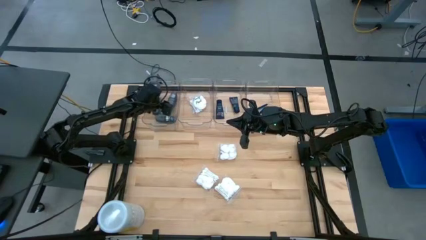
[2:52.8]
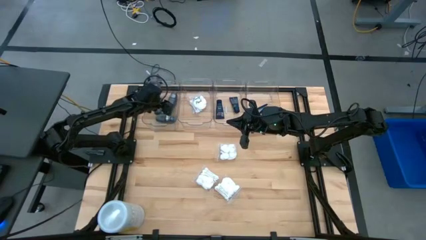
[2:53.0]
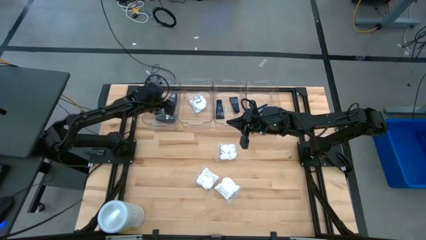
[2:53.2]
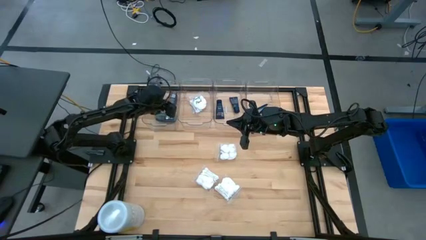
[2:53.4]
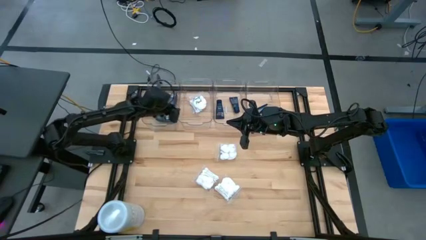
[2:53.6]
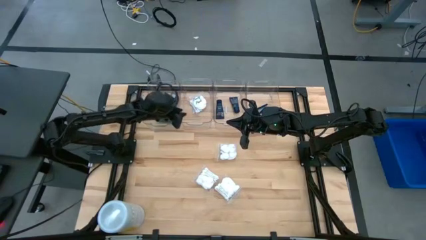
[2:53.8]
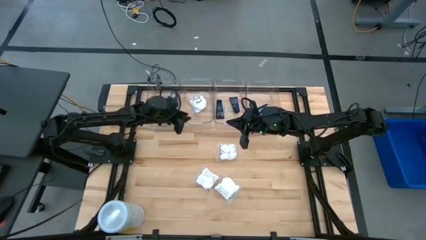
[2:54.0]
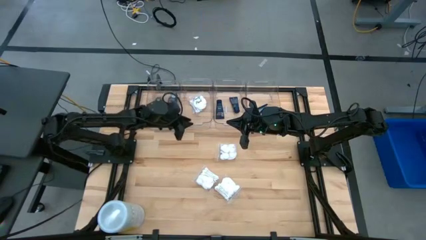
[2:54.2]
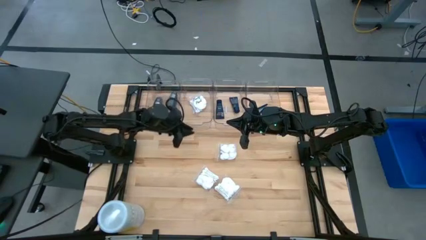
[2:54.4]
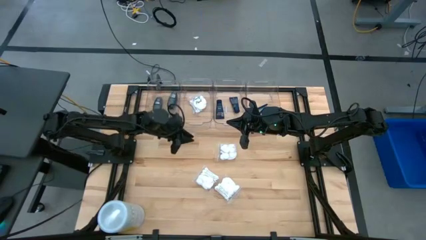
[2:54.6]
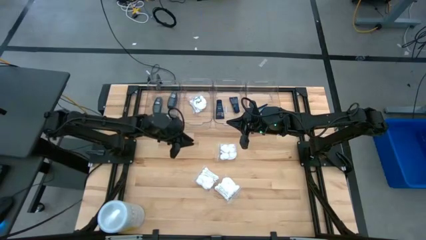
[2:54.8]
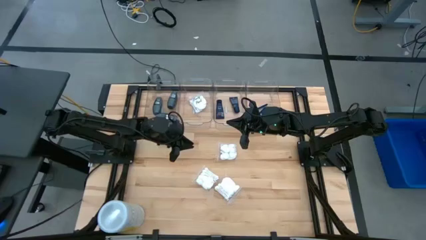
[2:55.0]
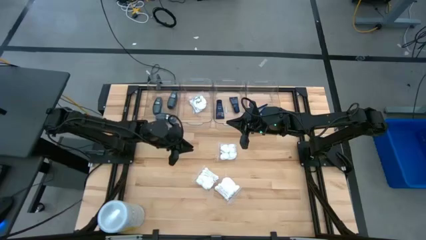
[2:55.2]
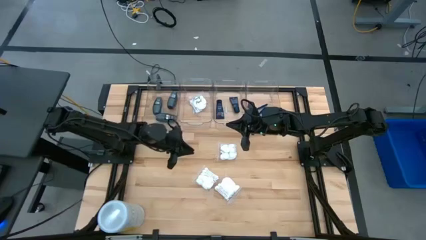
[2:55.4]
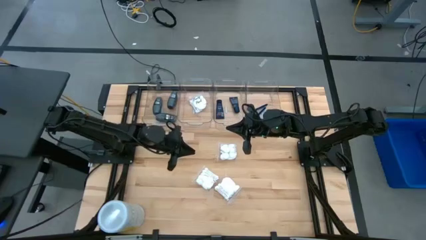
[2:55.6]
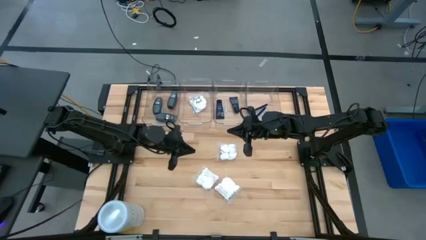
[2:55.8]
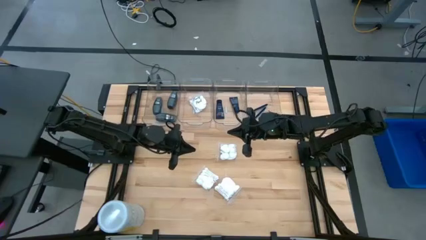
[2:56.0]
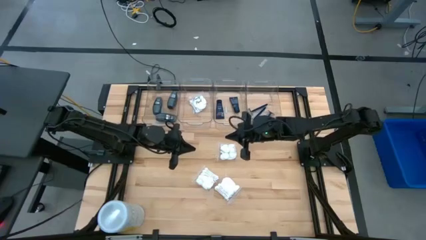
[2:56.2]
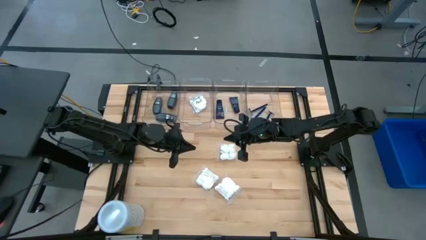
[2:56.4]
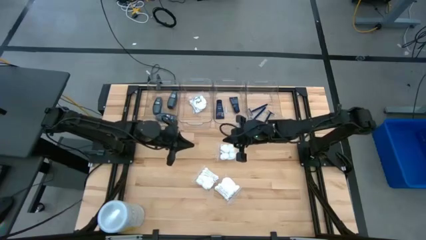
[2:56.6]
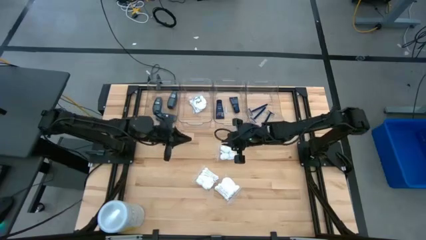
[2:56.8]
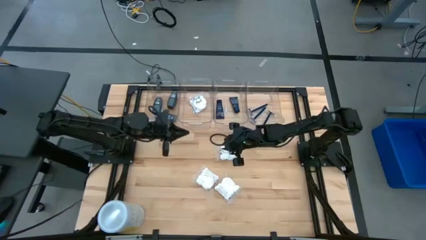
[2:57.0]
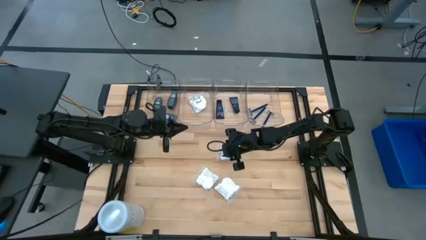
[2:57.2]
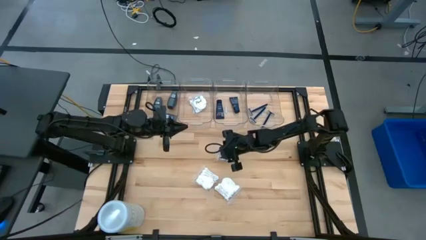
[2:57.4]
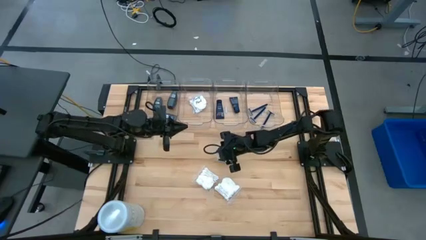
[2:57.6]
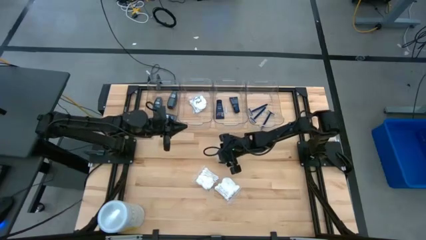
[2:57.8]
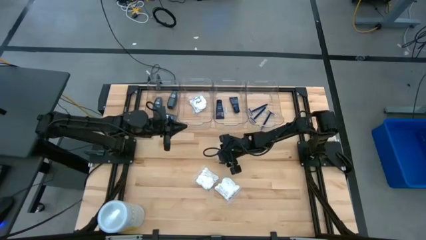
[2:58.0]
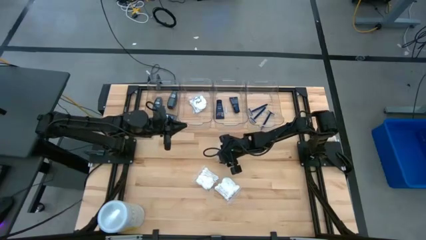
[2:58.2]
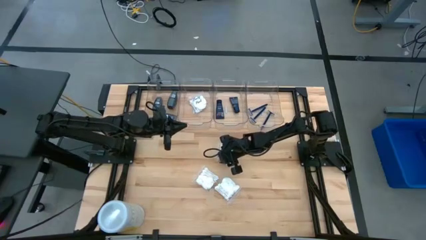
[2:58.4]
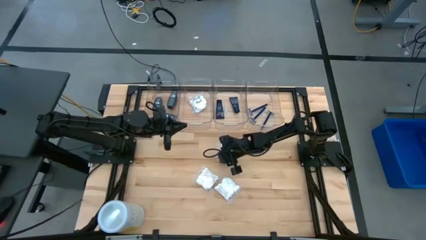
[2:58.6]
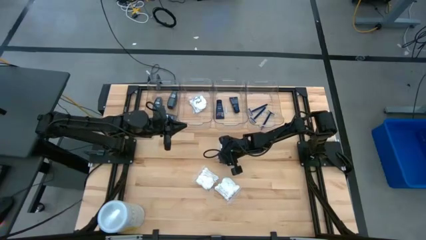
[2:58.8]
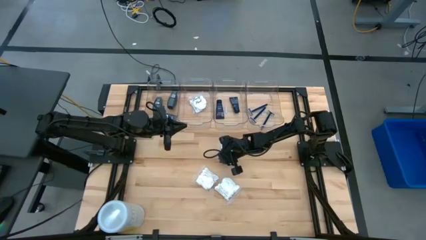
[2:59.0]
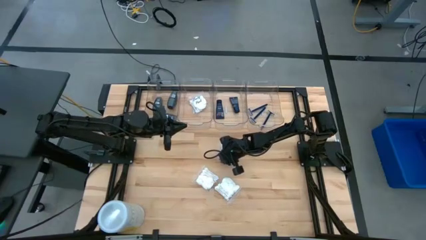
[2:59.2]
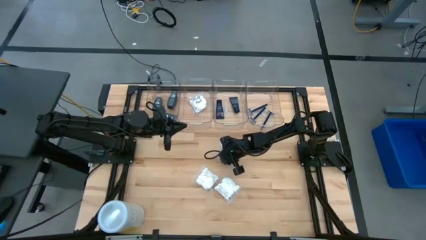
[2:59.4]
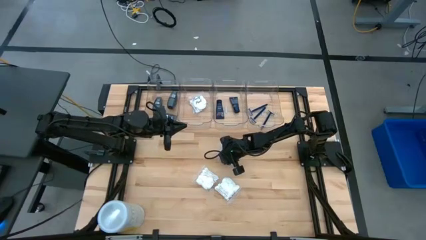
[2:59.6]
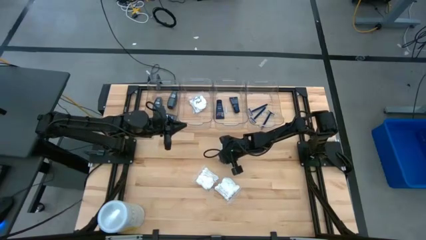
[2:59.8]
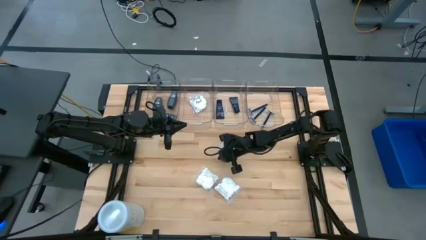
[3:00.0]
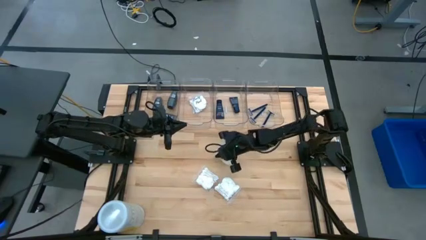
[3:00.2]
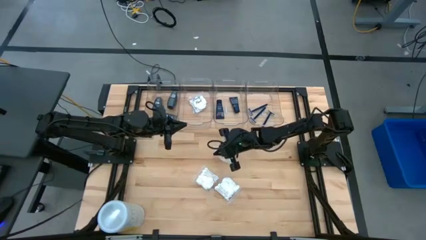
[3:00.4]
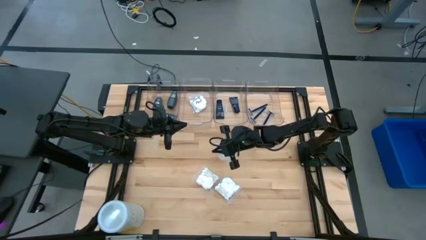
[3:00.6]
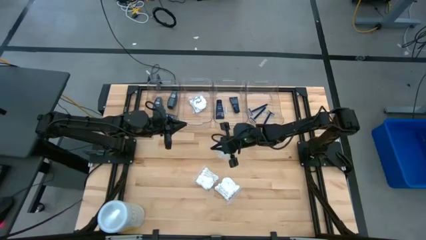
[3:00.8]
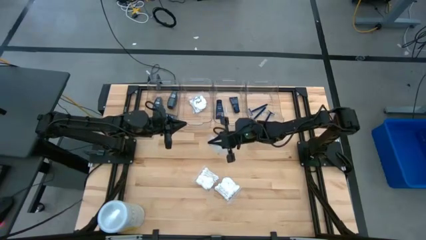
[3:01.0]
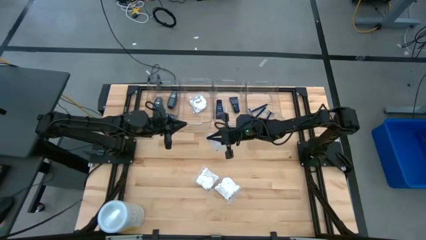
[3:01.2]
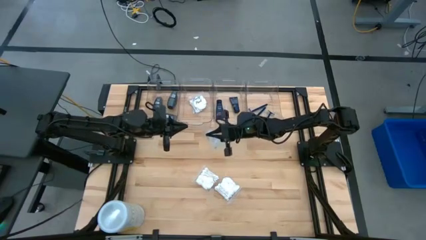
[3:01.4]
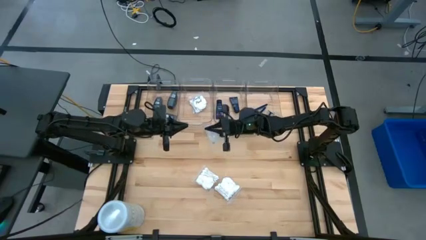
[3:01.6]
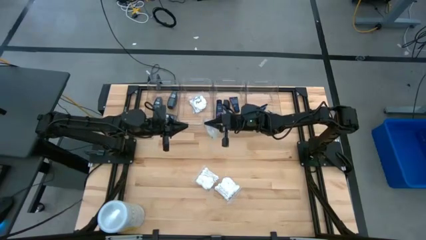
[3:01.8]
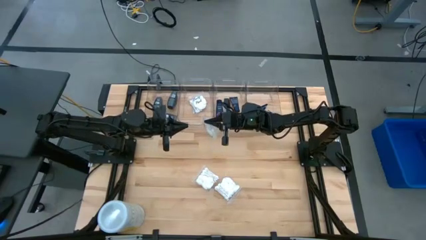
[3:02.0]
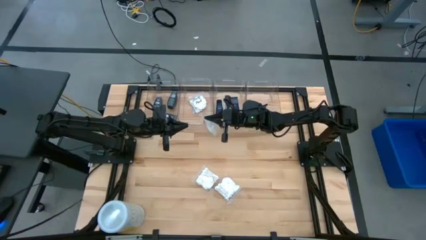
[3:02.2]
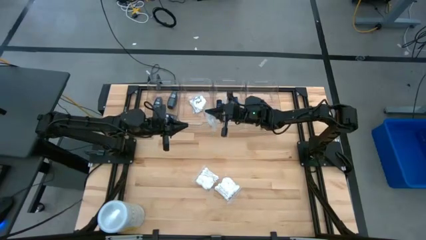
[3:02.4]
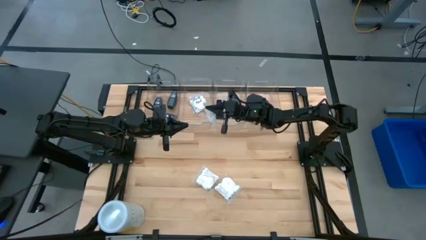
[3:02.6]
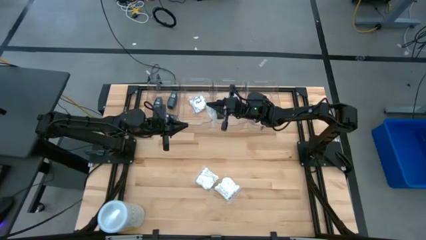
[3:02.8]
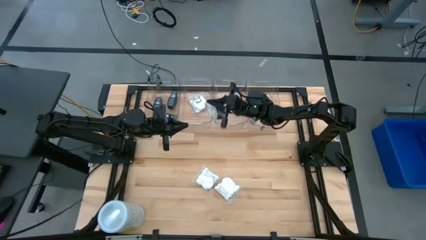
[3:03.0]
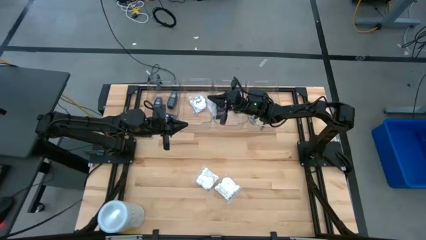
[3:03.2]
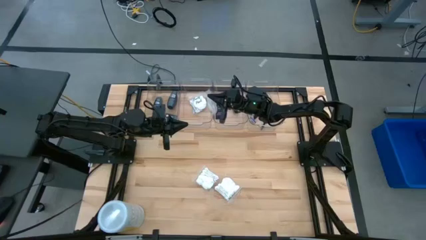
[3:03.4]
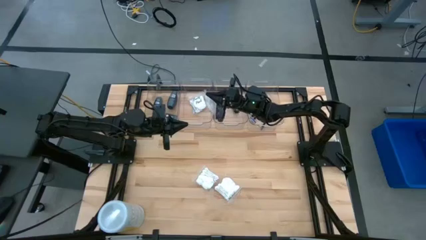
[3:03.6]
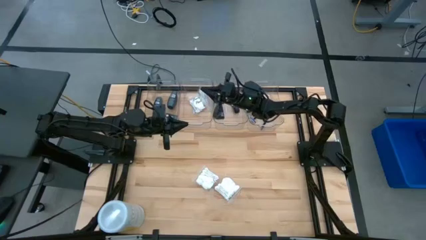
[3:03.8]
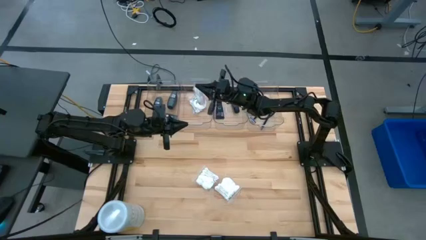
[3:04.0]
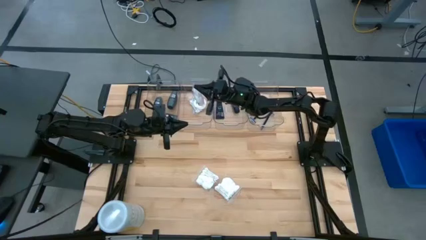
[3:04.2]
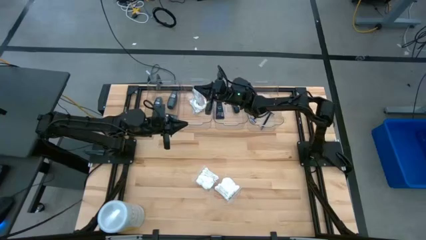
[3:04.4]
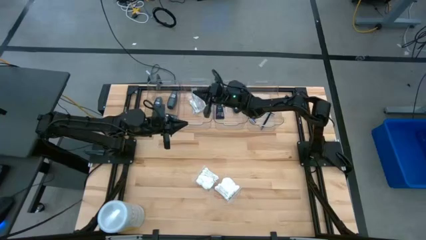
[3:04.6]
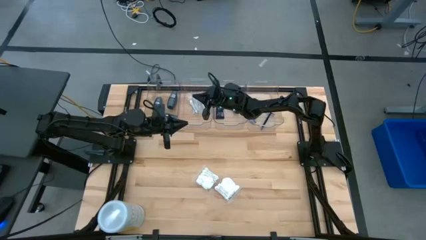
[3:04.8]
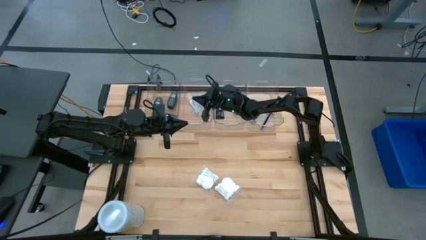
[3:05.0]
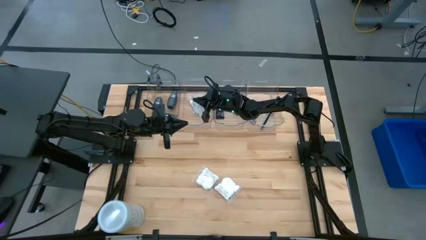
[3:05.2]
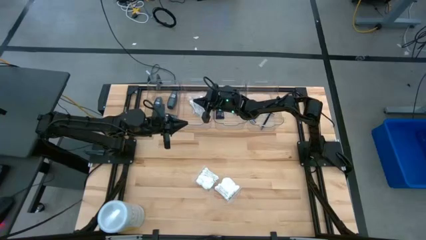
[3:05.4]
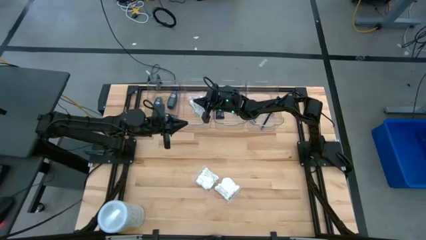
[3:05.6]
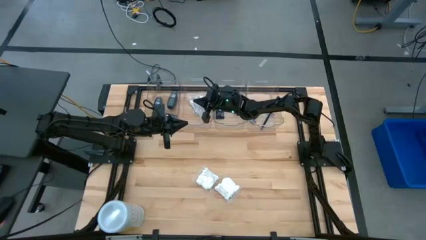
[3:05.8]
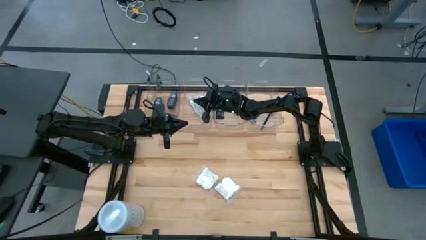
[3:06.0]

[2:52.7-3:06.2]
Task: Pick & Place Travel size toiletries
Put the white vanity pack into the middle left transparent bin

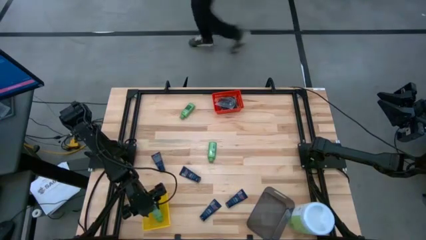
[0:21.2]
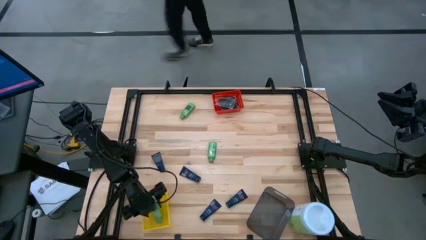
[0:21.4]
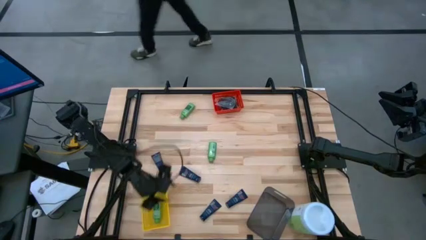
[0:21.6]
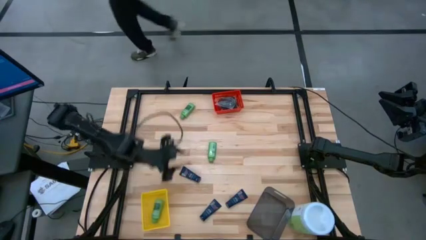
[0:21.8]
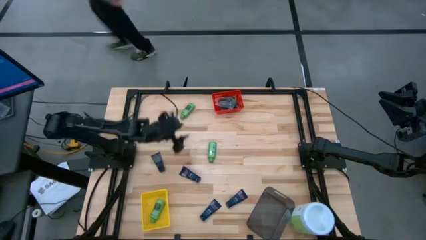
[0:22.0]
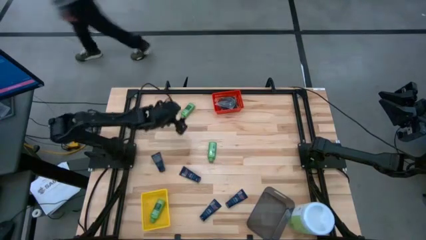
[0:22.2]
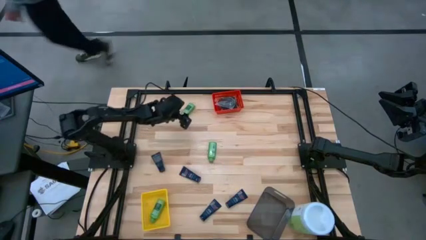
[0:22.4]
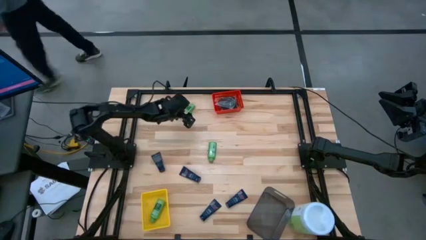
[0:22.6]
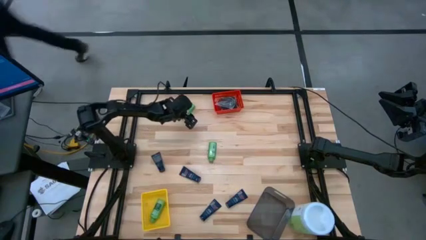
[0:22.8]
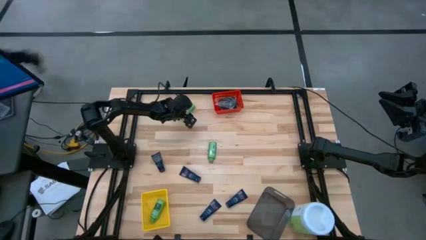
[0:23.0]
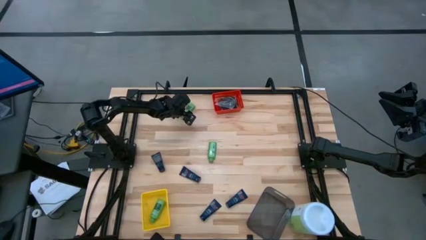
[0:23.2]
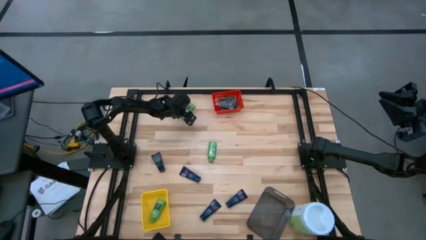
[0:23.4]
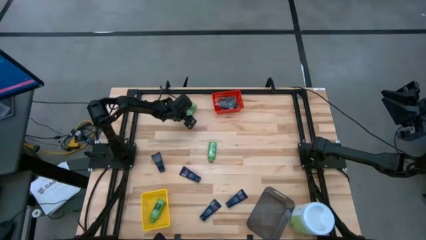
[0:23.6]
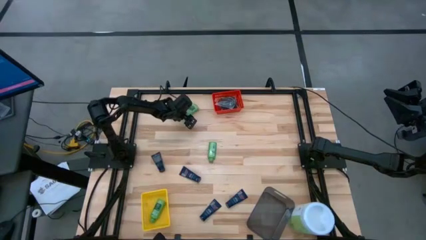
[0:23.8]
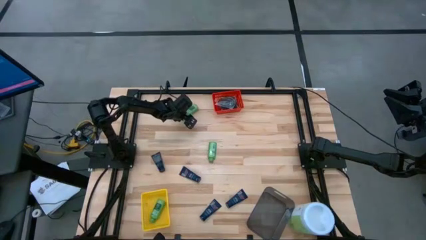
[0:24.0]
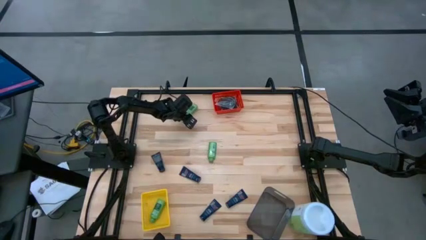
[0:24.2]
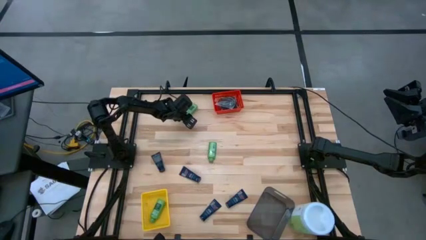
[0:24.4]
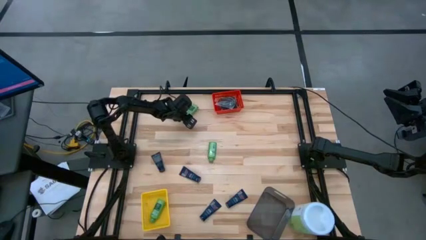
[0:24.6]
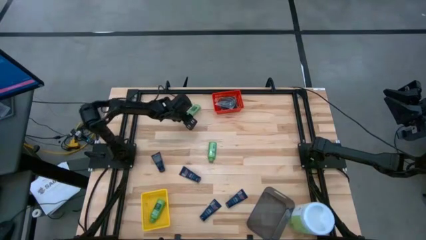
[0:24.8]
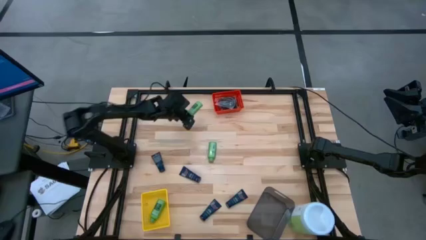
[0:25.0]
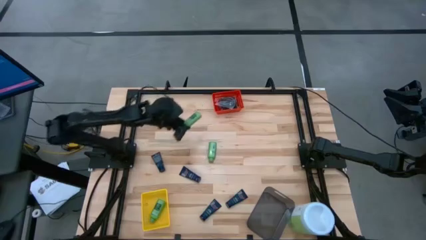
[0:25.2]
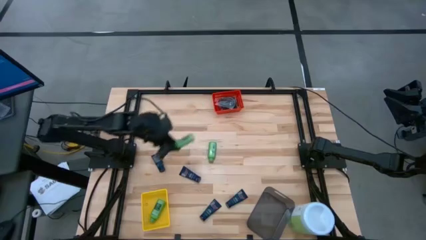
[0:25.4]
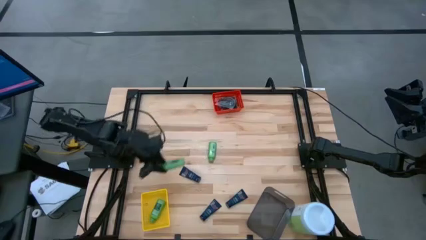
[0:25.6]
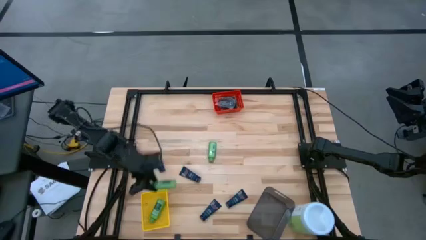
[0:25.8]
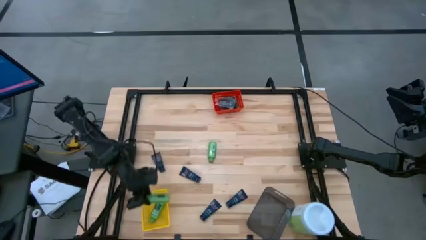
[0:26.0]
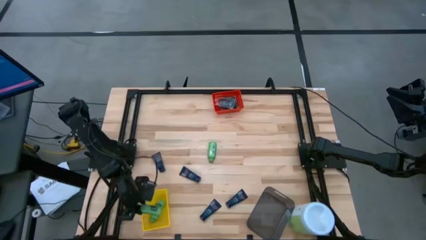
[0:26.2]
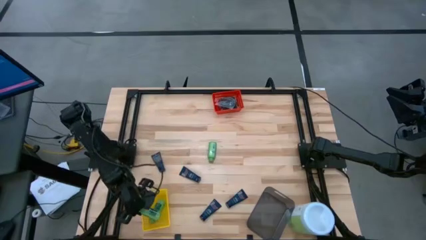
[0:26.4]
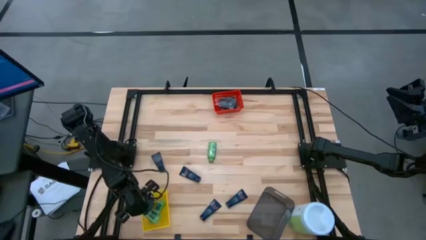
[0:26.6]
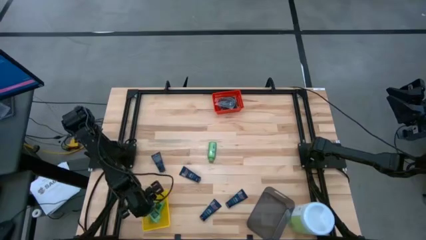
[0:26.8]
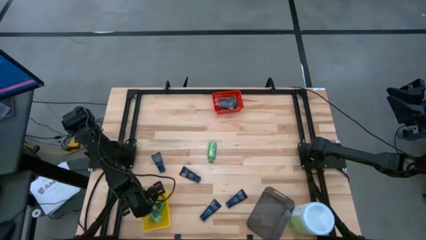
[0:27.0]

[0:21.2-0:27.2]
Task: Pick & Place Travel size toiletries
Put the green shampoo into the yellow bin
